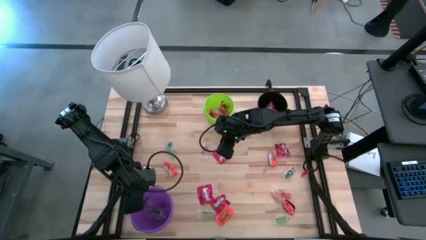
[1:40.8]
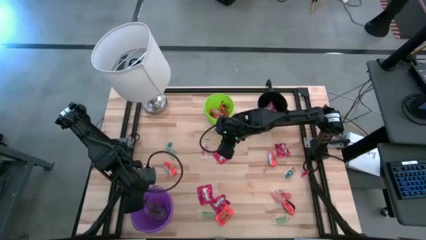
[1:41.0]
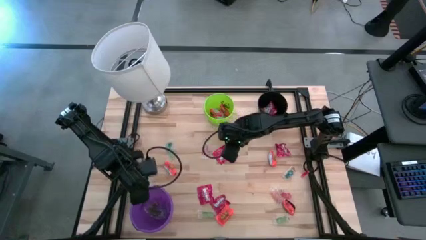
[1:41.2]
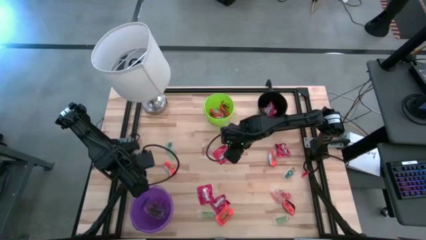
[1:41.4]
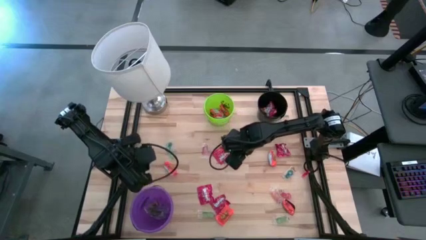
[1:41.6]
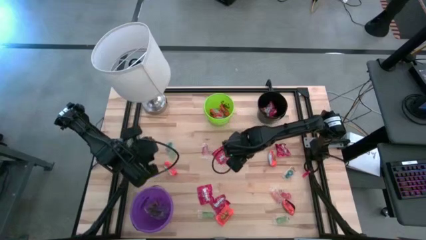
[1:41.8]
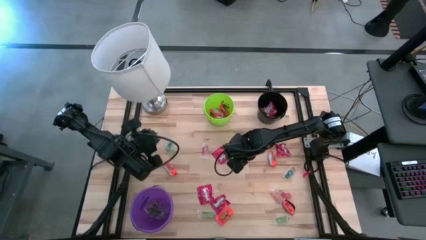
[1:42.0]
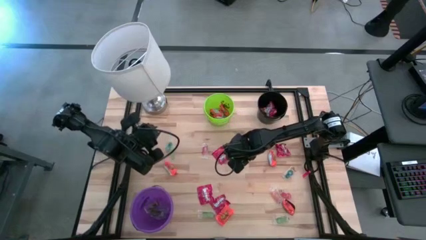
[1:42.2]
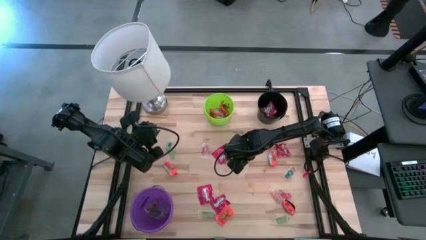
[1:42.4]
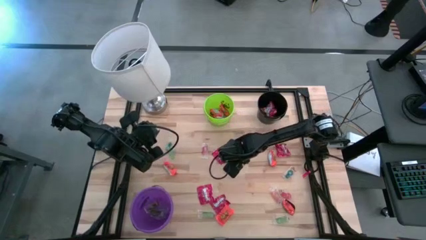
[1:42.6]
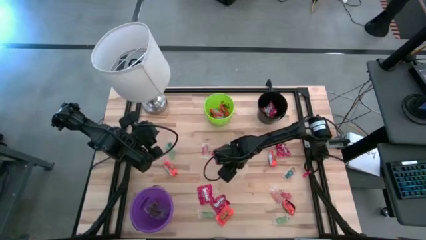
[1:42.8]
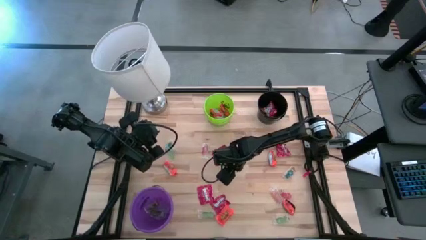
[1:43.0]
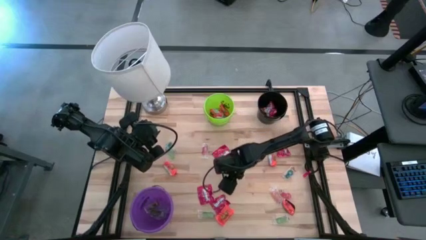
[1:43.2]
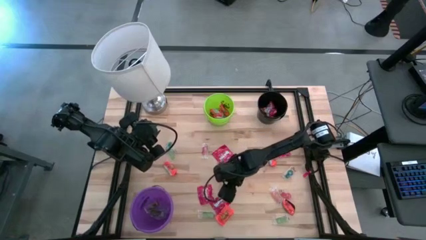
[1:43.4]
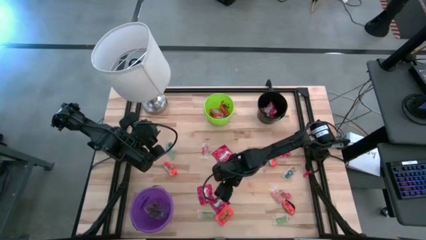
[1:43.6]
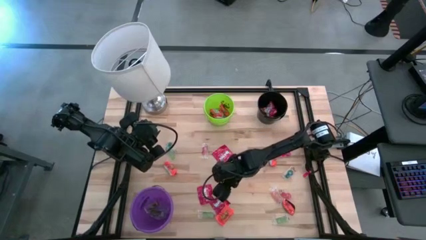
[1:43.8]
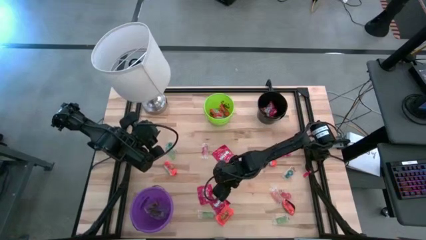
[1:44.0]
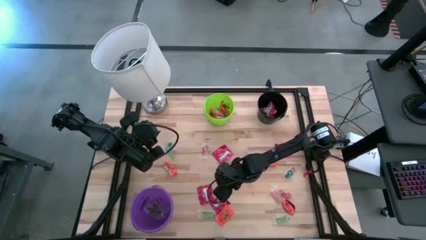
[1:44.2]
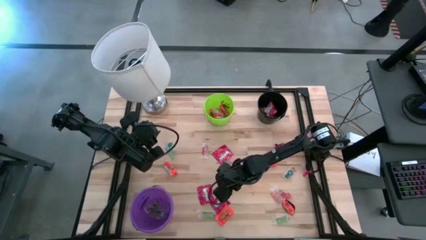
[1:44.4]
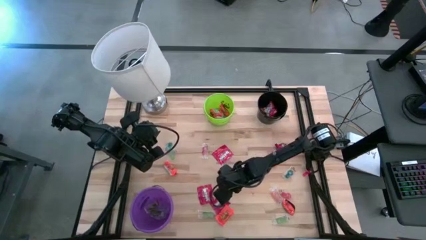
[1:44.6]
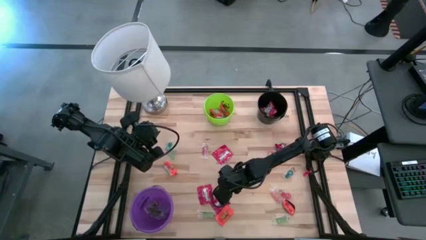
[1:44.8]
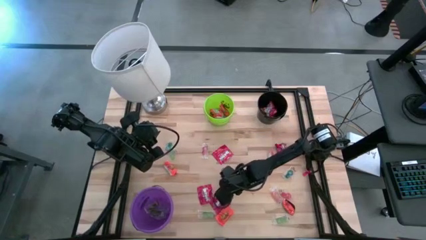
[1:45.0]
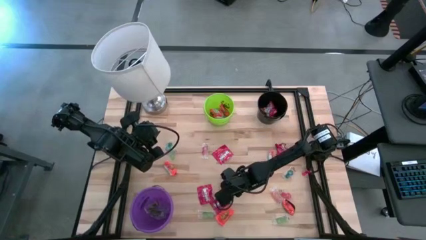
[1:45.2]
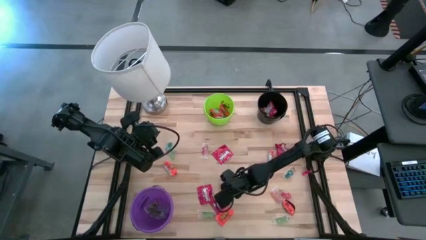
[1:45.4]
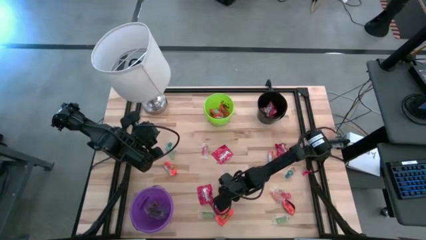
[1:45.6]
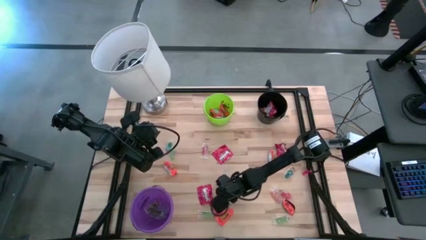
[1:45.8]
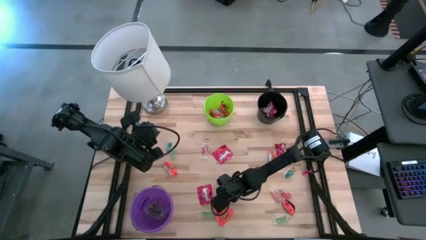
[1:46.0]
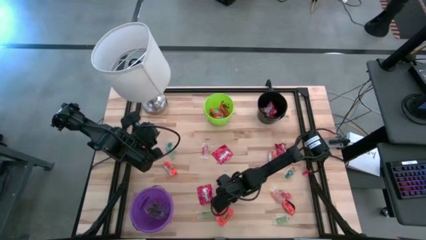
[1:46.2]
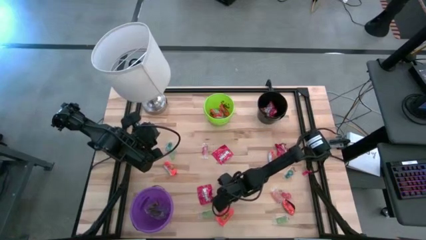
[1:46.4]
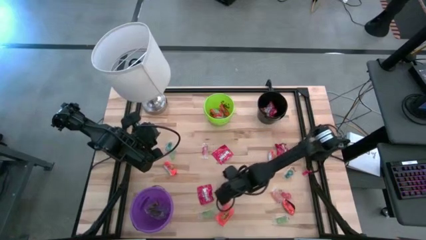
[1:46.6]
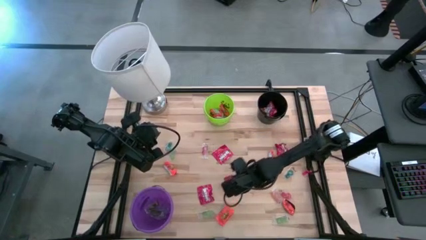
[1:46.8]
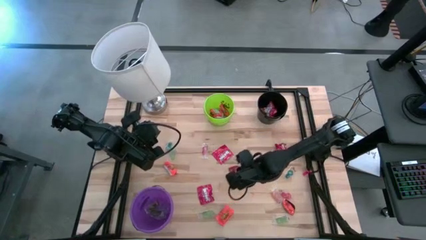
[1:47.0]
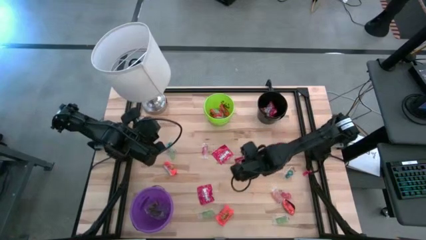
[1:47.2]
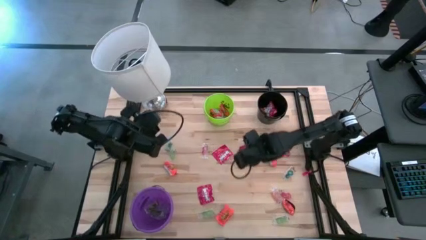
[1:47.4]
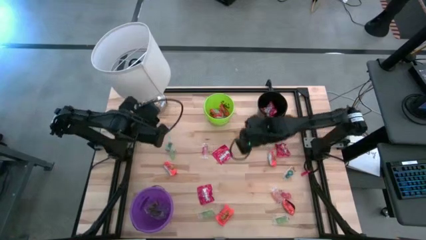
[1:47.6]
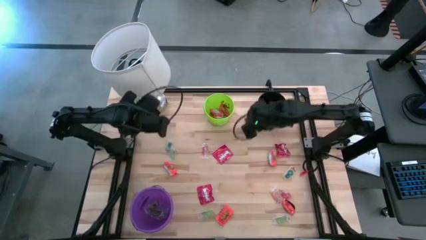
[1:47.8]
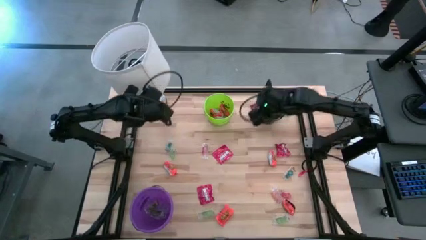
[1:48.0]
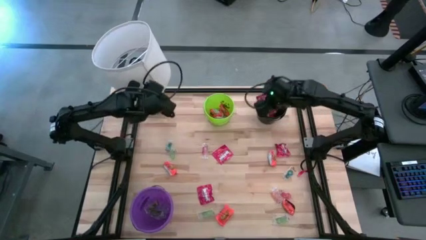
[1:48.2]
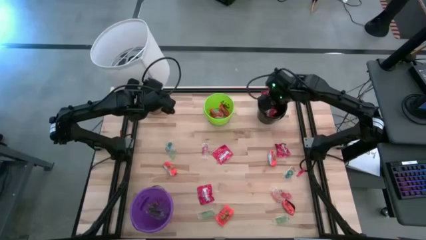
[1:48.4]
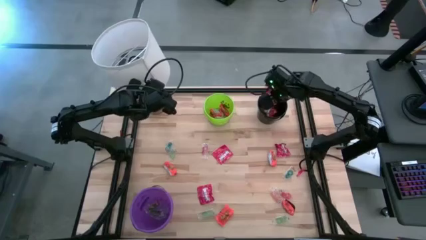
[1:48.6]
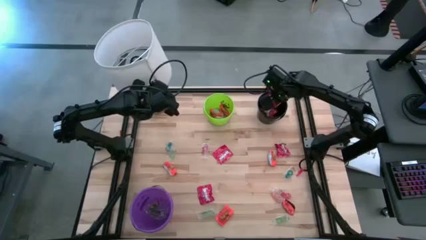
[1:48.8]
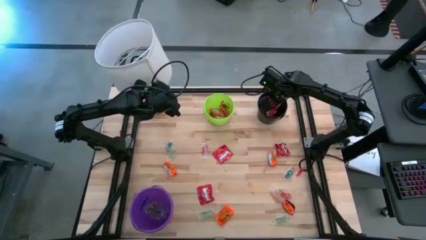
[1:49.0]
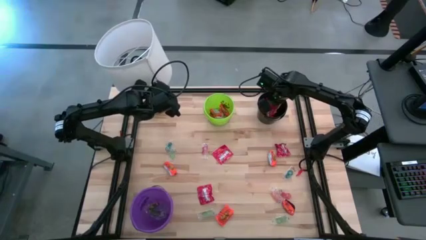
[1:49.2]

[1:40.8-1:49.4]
Task: Sort candy
Put the red candy into the black bucket

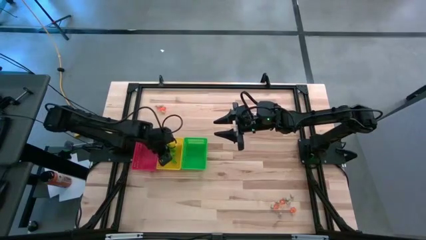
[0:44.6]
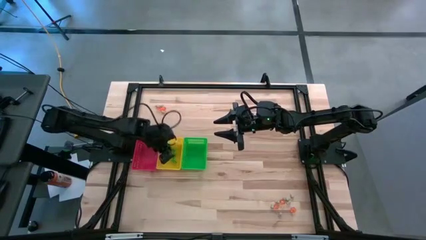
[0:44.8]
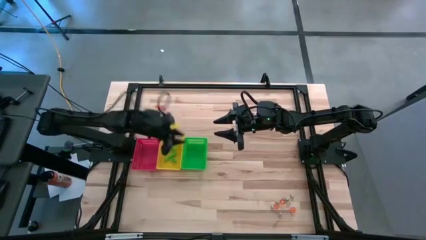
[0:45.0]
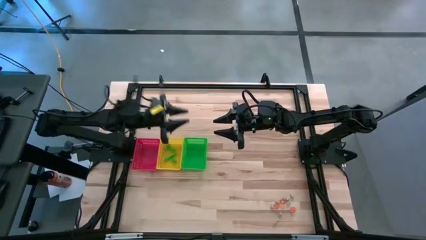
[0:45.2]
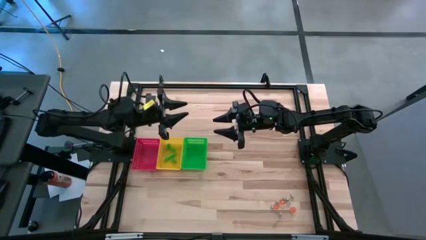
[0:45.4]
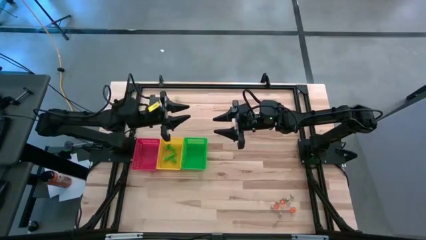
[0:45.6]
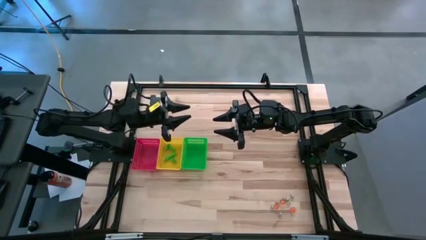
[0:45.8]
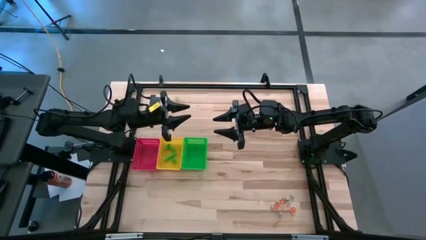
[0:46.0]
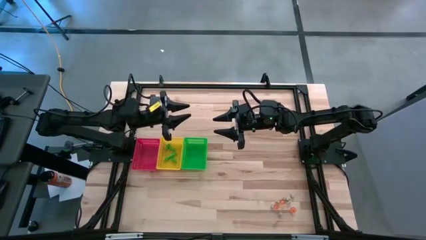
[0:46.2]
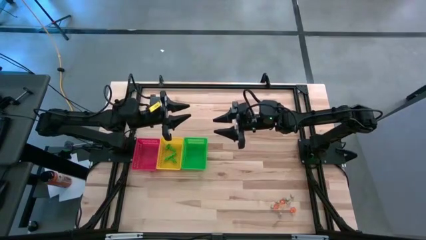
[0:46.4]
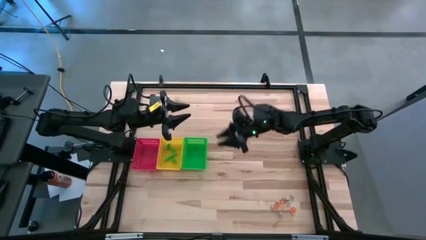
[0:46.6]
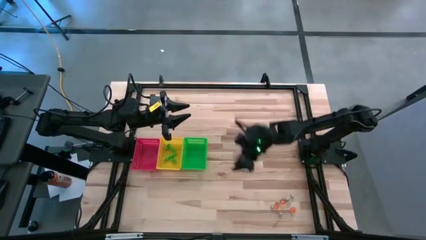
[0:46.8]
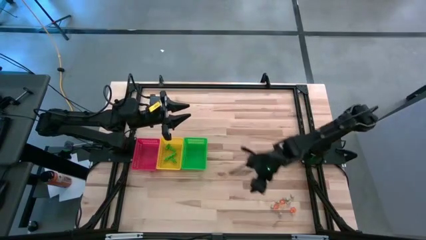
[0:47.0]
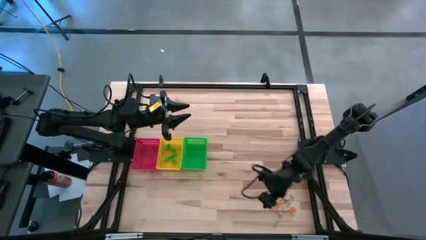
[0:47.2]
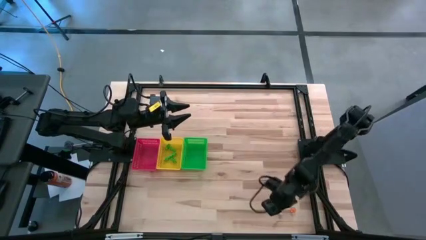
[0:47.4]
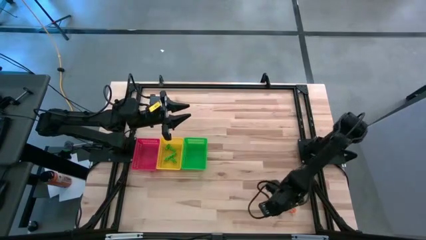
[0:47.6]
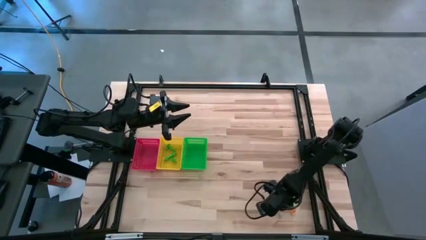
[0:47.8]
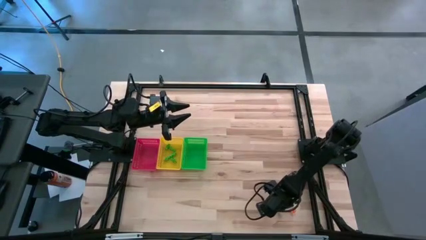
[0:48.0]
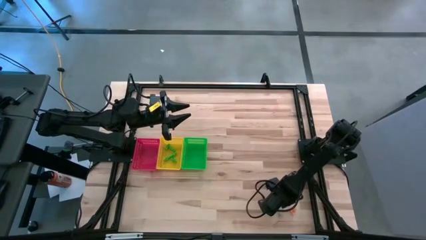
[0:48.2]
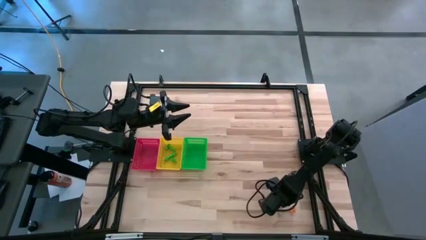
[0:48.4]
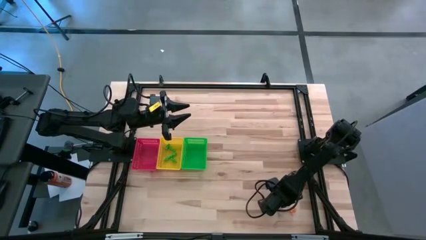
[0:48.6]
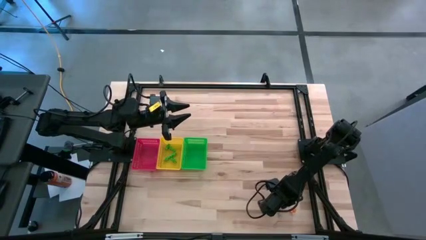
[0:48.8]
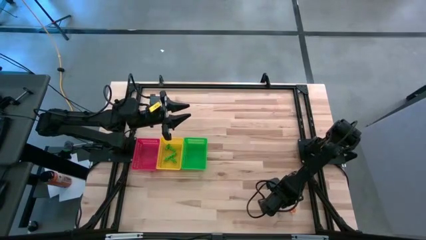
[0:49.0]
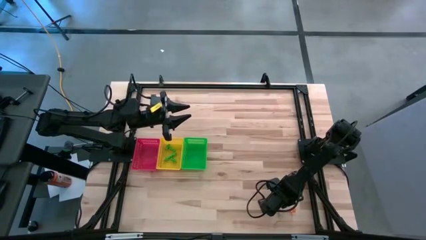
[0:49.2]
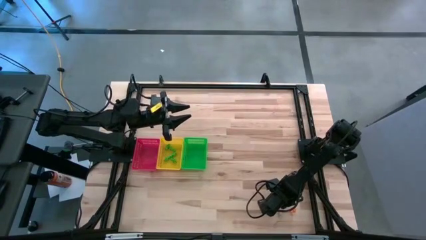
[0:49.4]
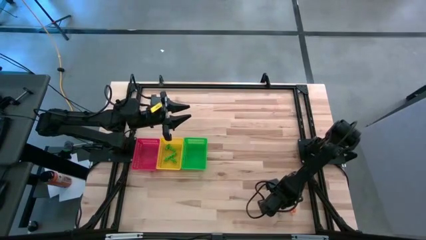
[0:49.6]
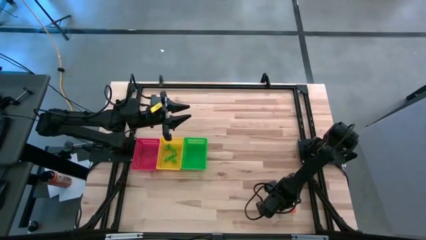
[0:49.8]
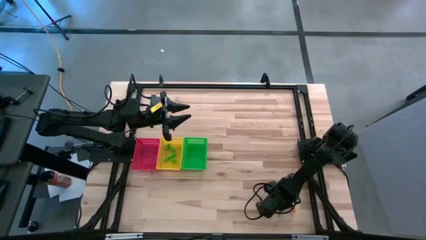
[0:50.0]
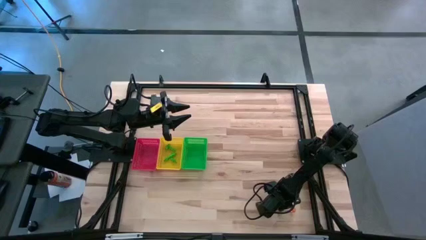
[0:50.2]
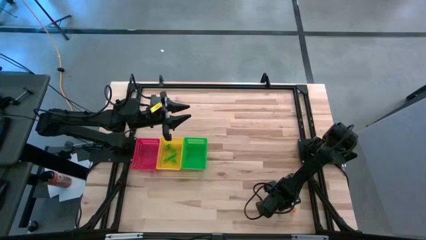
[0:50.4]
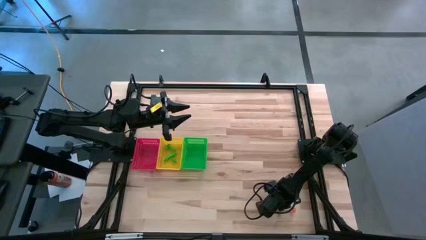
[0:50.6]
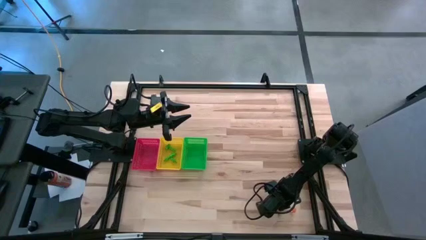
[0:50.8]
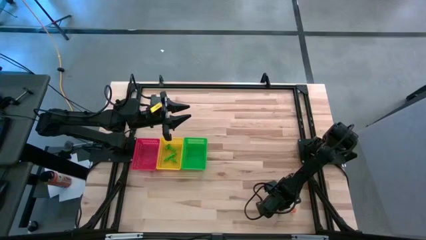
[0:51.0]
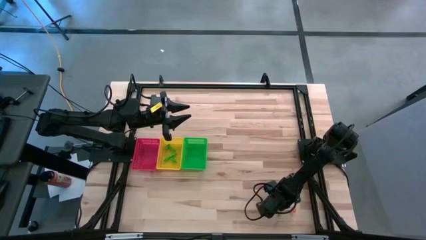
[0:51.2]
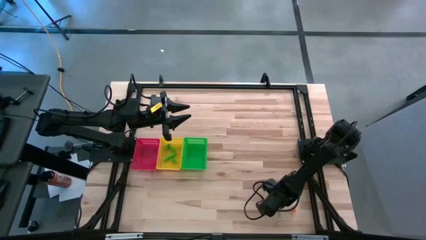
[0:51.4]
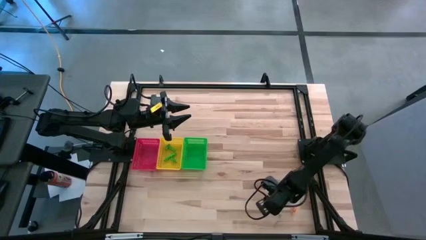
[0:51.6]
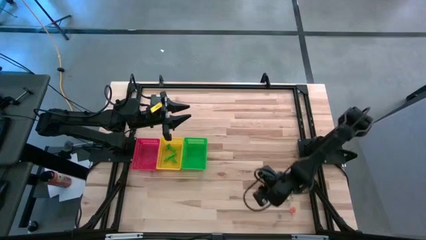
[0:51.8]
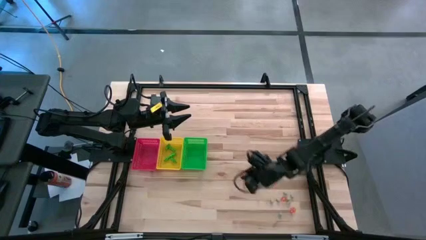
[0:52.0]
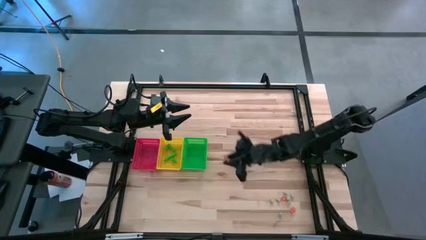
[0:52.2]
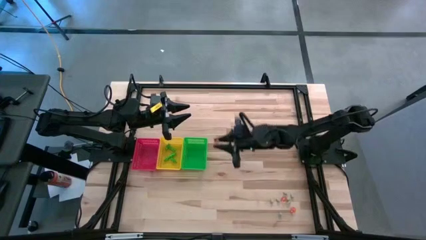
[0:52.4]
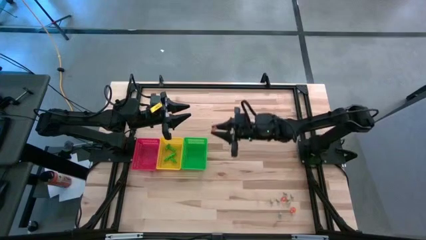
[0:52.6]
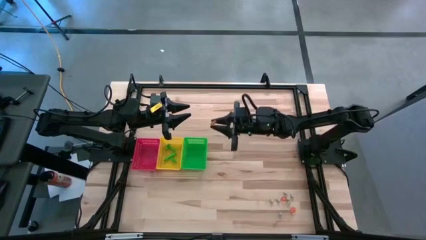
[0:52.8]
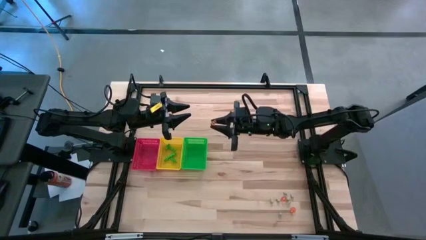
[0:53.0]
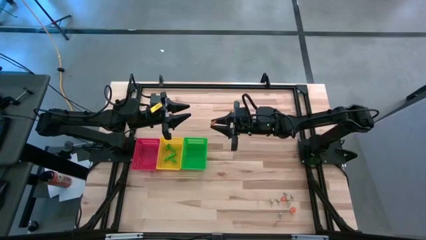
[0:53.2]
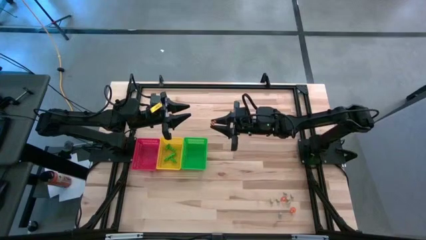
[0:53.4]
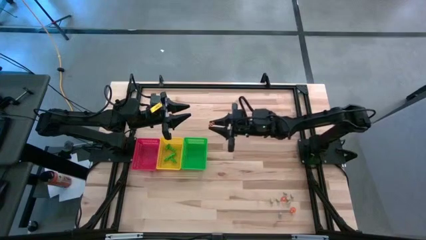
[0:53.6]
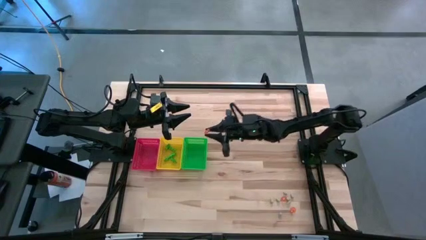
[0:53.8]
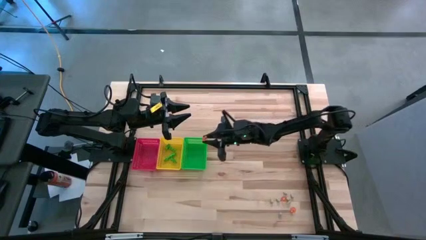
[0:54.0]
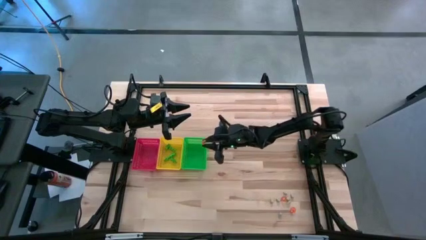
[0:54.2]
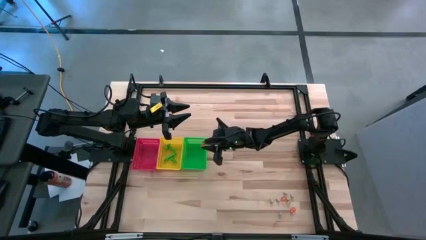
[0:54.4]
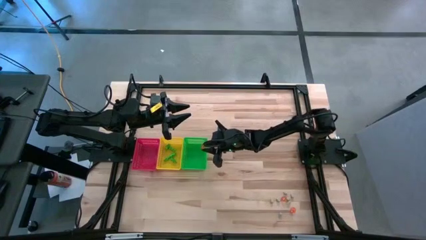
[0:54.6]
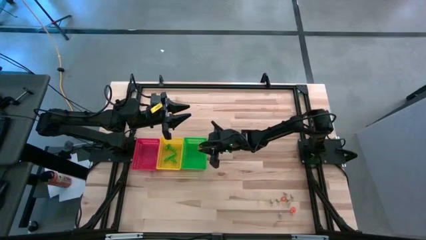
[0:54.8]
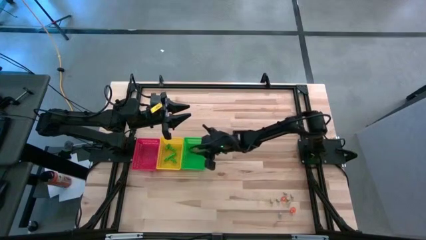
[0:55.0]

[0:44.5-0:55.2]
Task: Sort Halloween decoration
Put the orange pumpkin toy into the green bin
